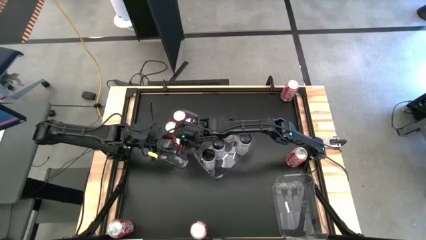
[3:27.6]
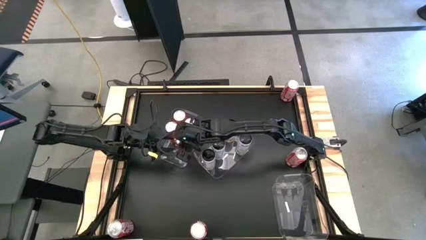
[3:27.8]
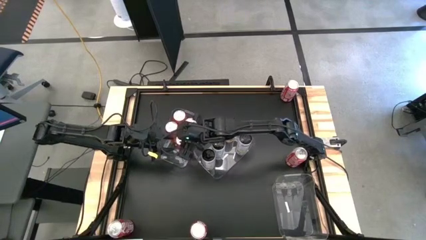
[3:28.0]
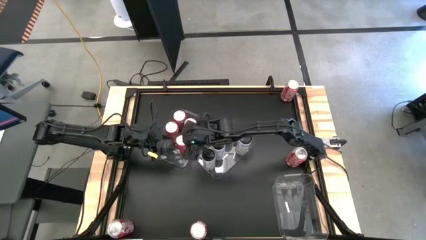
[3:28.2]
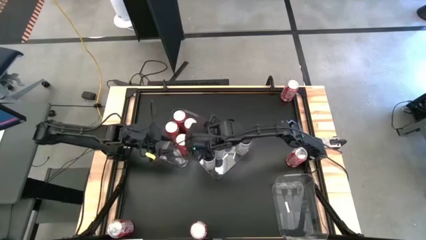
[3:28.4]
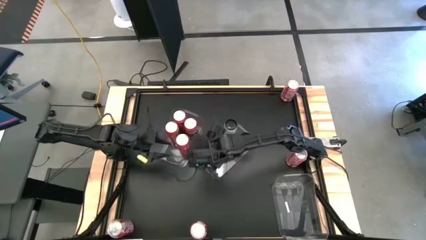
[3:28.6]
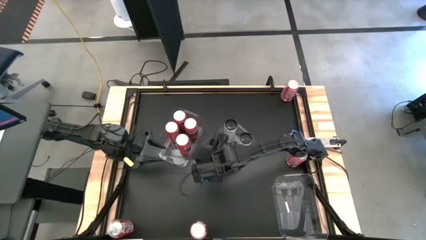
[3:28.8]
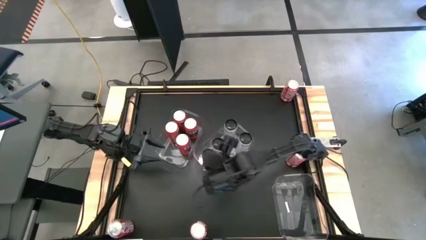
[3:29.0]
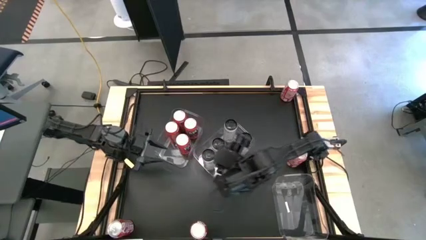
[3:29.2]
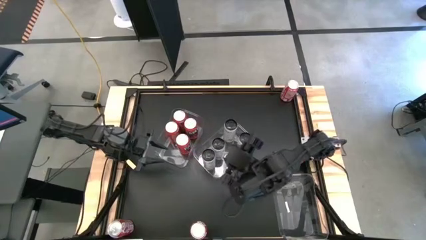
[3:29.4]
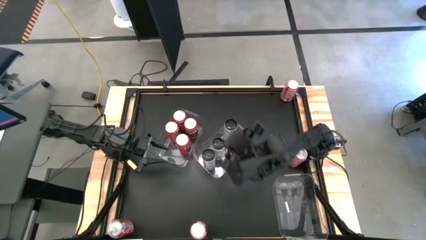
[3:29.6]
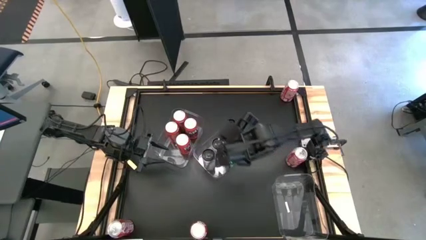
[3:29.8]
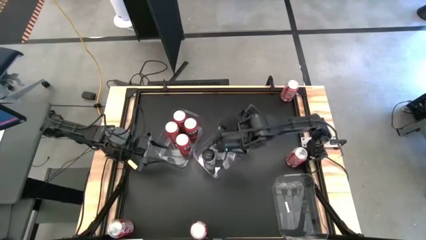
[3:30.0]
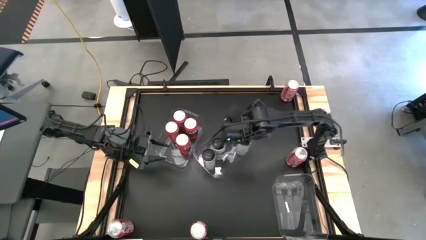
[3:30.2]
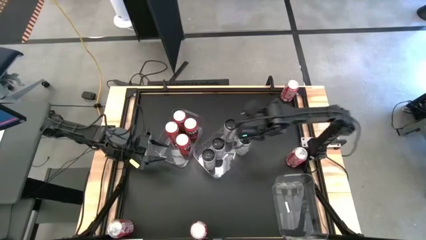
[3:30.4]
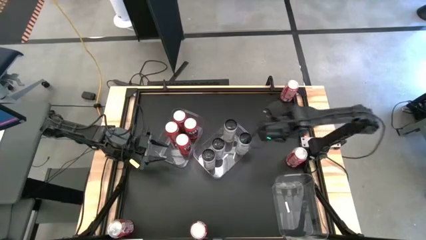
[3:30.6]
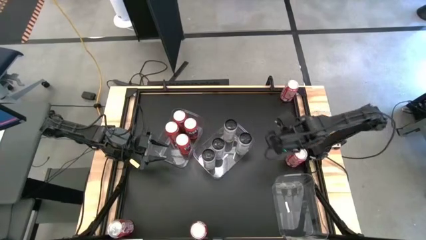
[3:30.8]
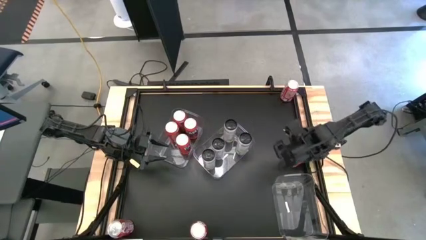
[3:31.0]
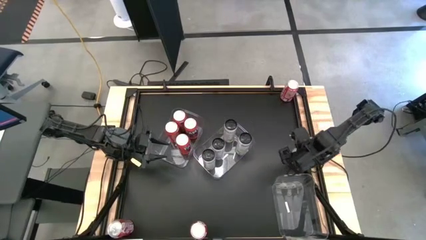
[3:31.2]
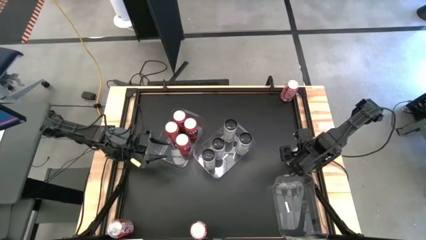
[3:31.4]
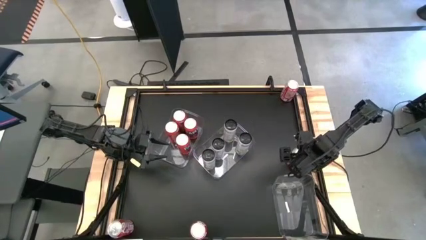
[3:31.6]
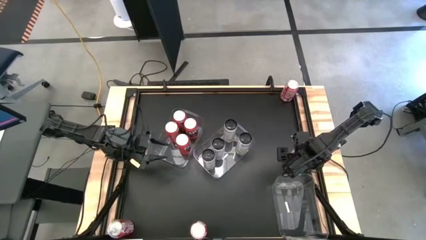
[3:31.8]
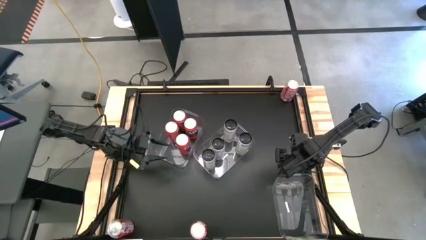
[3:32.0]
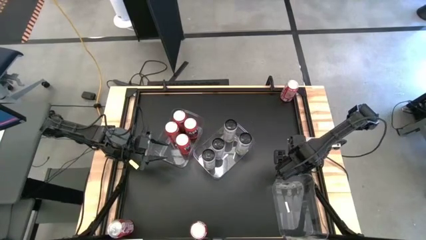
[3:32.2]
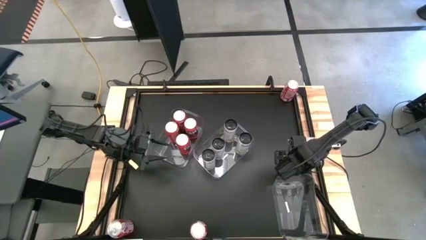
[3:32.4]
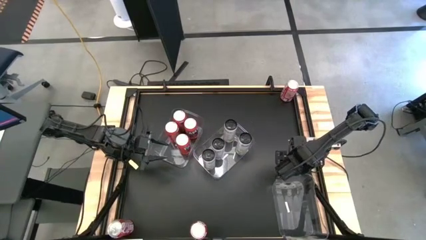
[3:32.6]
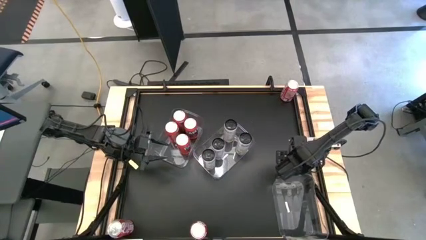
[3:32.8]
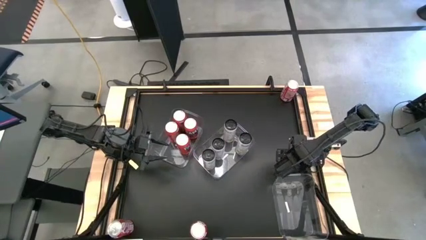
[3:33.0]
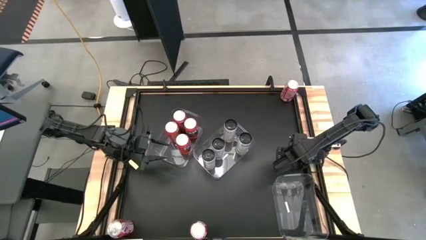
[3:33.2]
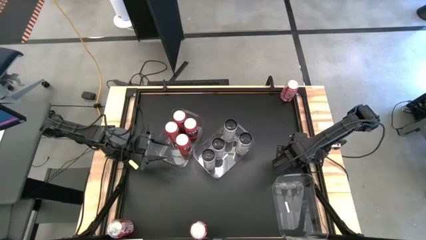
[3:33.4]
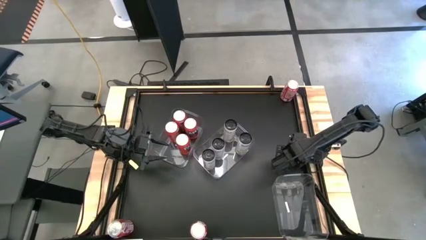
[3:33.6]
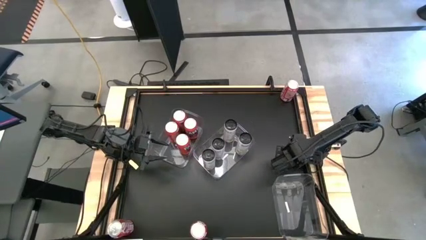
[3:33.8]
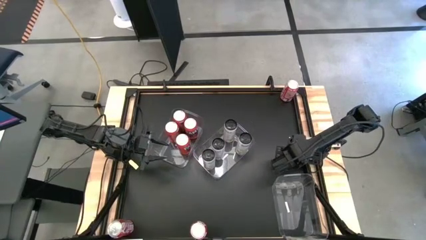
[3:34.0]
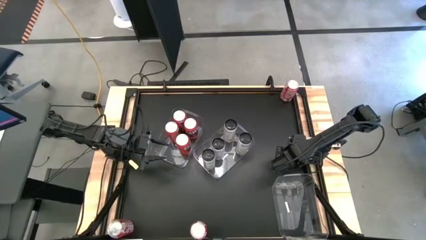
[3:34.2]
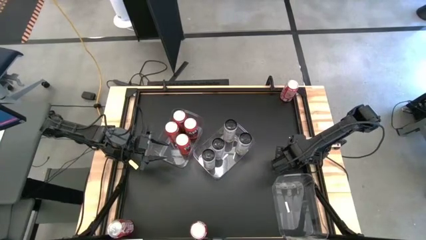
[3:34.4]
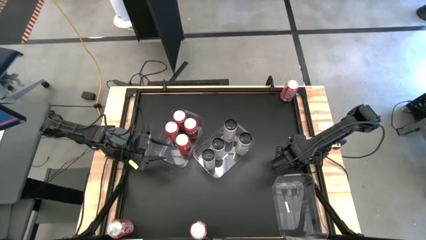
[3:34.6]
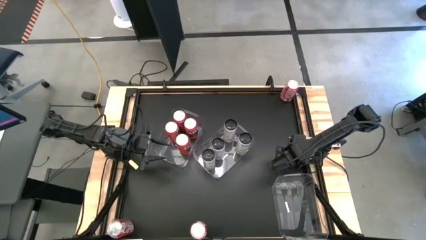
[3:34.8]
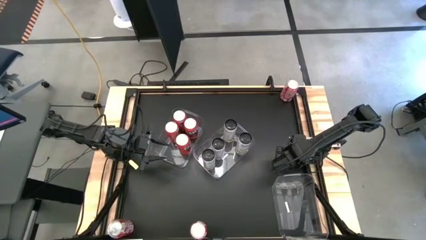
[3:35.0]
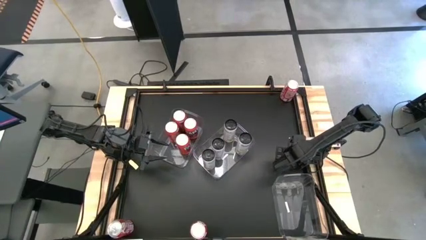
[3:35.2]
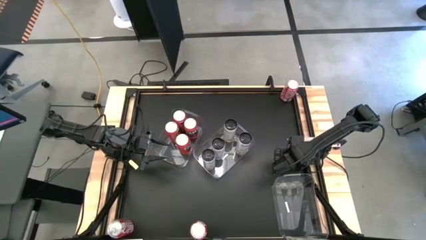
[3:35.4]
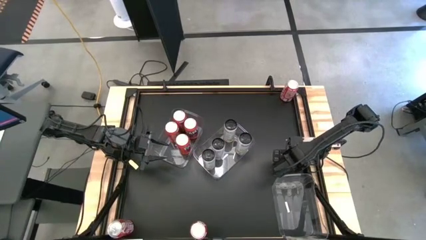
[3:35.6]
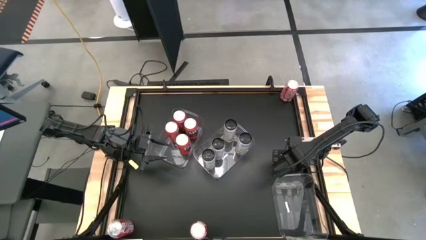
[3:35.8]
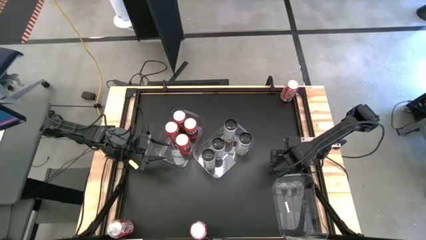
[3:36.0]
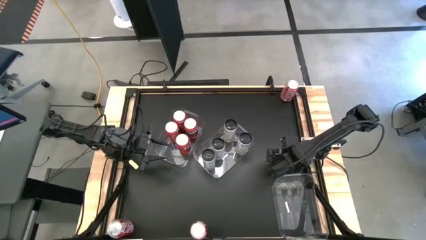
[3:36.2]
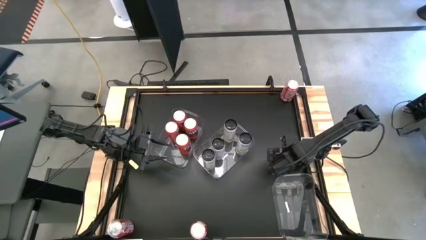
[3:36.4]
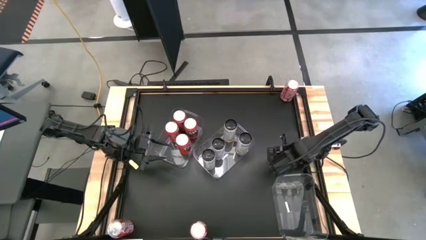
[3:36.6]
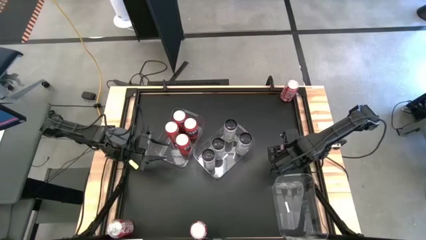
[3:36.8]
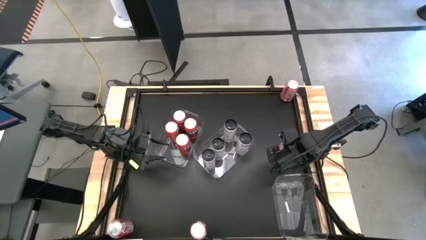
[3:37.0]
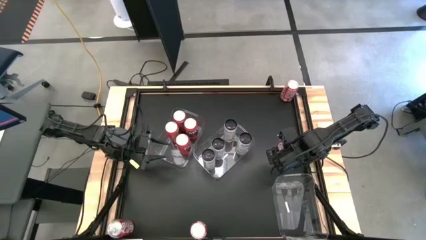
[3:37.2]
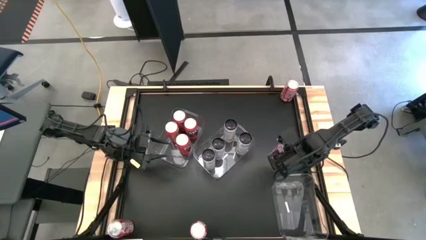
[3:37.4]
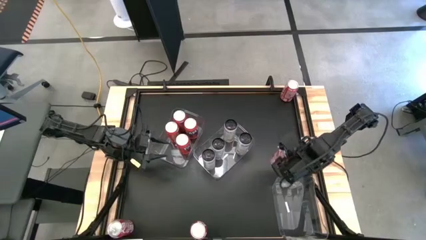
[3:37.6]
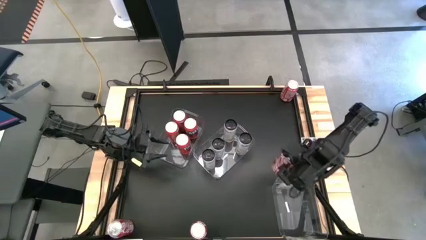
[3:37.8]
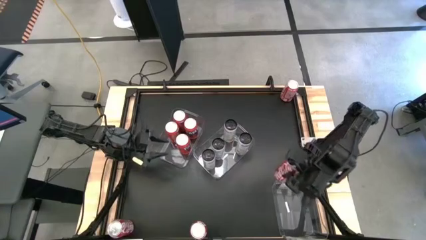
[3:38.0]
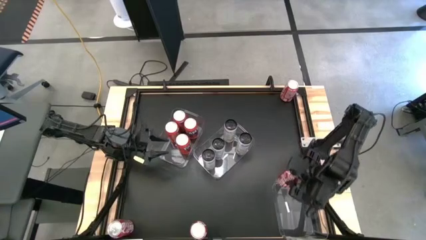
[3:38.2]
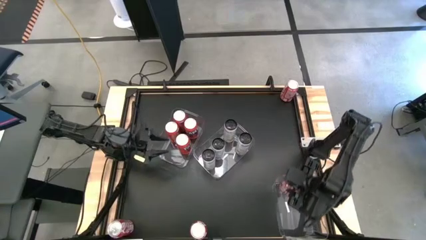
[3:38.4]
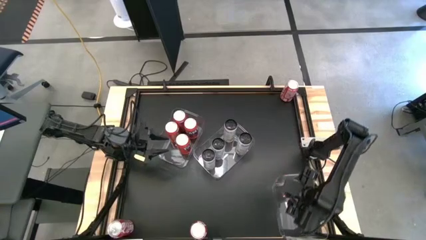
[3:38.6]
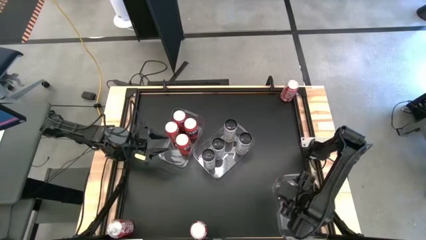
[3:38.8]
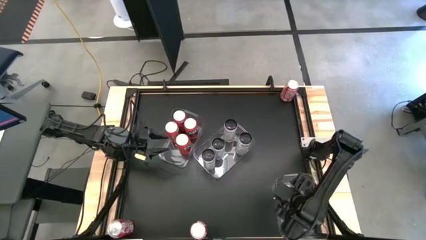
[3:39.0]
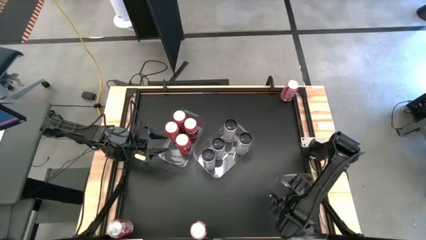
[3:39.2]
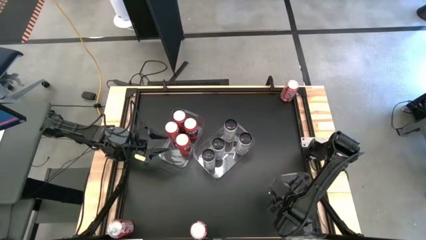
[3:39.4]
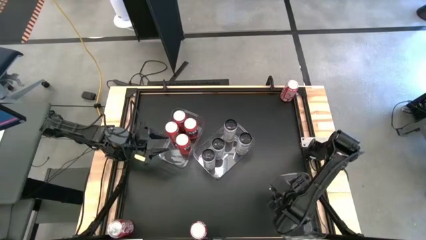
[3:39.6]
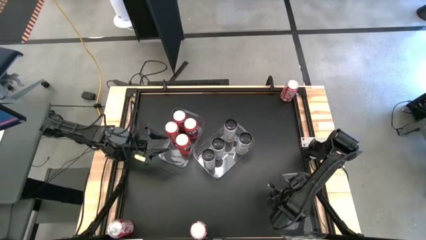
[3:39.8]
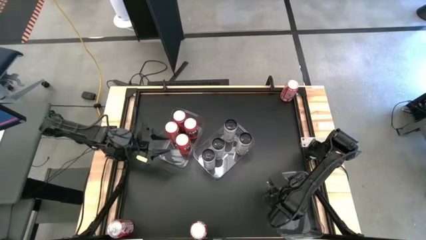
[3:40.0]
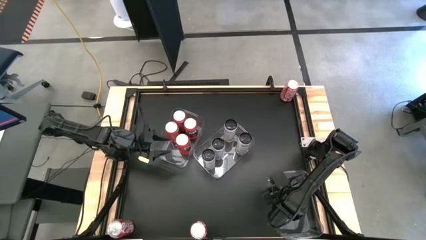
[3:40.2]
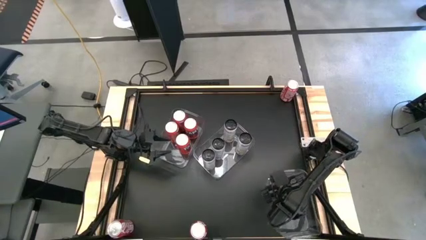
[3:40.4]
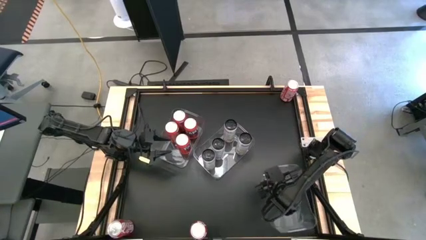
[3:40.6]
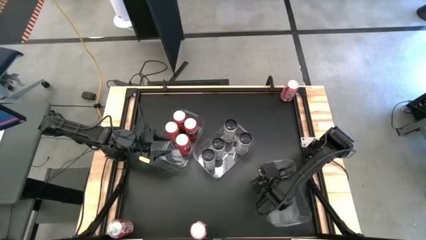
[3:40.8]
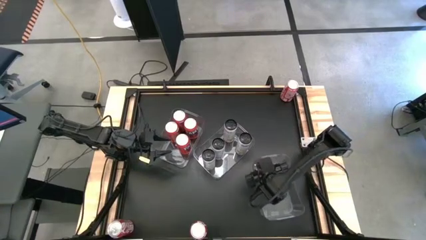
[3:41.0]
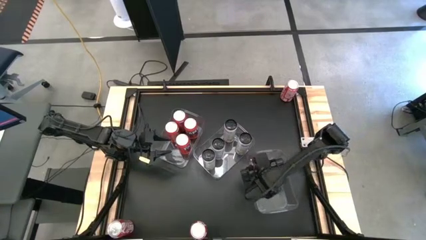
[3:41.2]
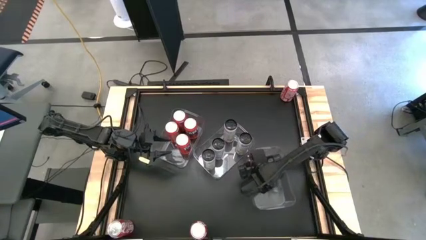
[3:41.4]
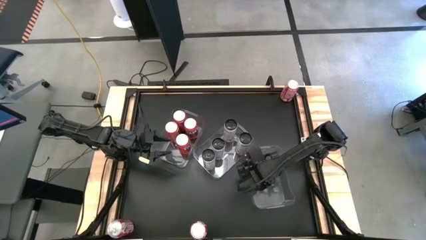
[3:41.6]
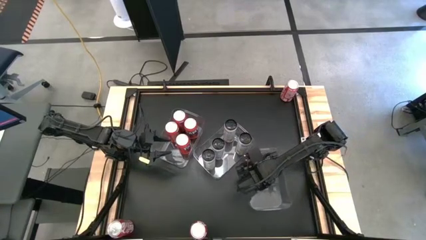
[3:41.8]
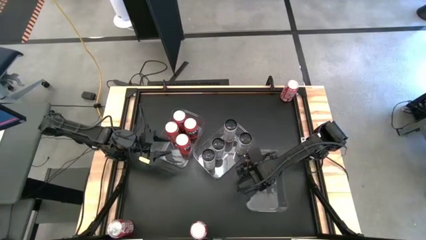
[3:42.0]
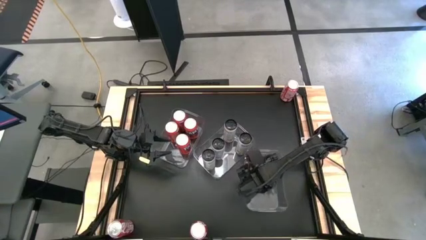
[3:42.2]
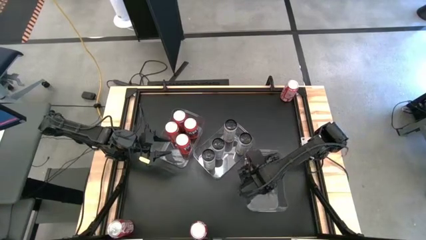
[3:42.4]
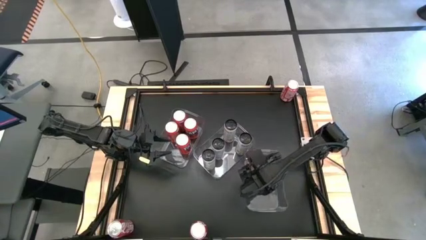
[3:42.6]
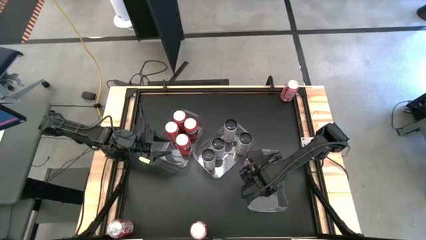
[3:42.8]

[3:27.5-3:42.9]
Task: Sort soda cans
Put the red soda can into the right transparent bin
